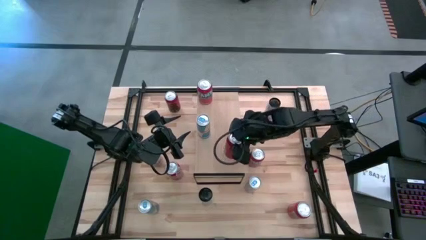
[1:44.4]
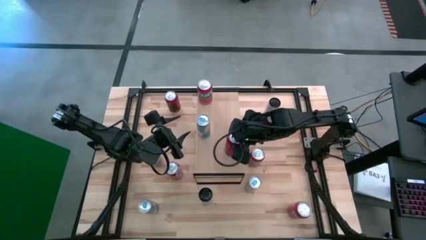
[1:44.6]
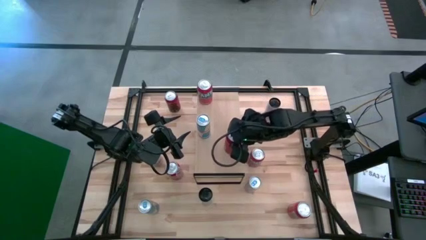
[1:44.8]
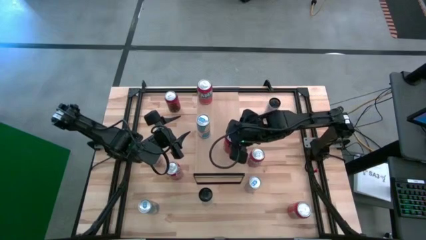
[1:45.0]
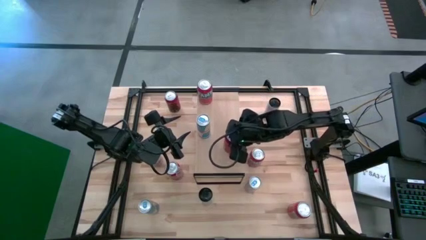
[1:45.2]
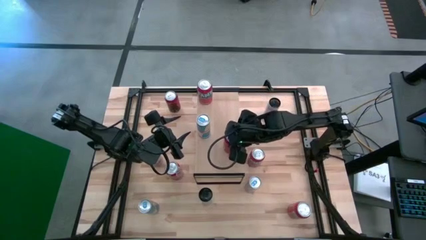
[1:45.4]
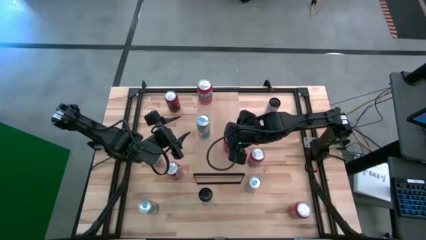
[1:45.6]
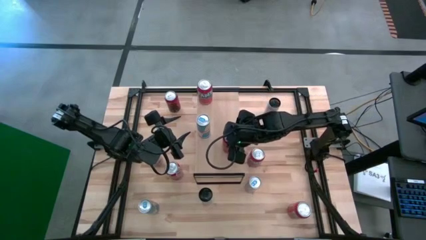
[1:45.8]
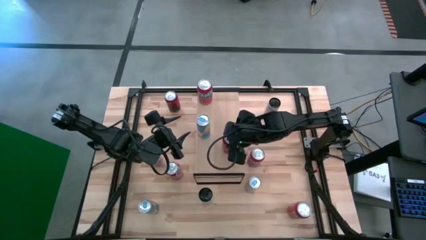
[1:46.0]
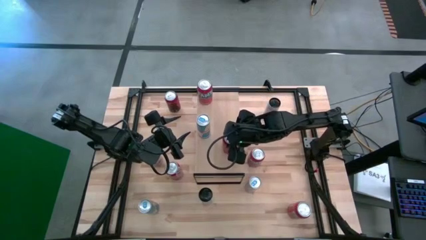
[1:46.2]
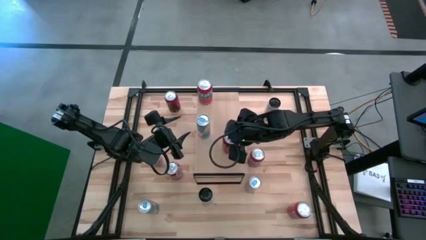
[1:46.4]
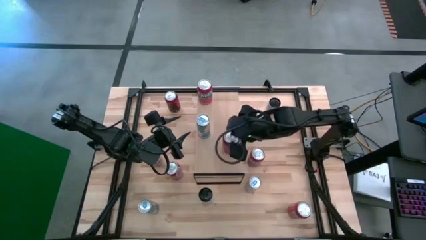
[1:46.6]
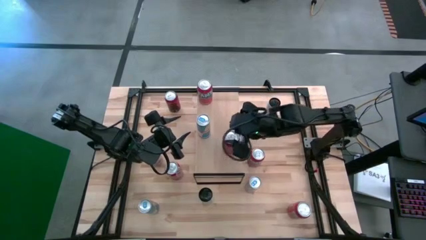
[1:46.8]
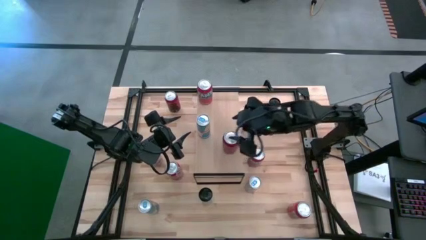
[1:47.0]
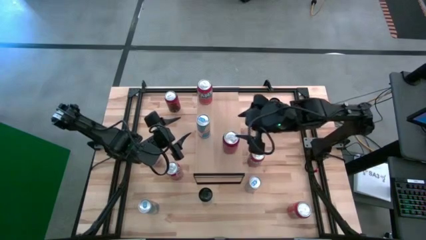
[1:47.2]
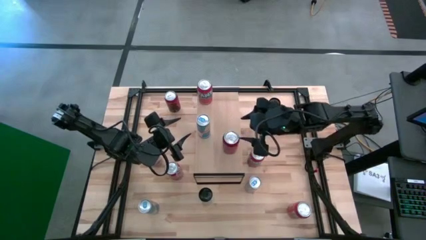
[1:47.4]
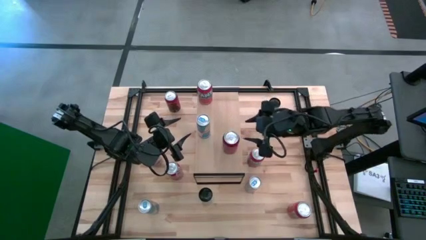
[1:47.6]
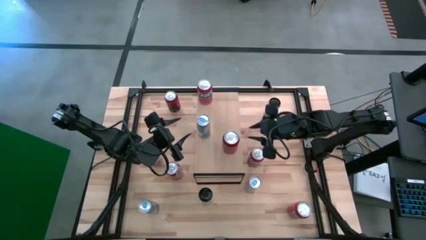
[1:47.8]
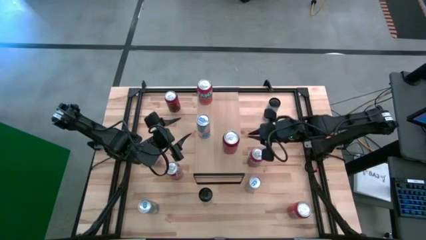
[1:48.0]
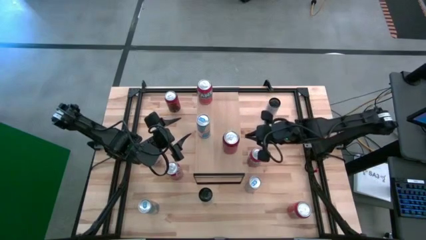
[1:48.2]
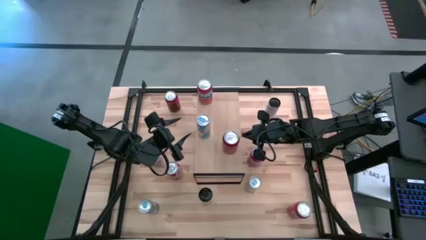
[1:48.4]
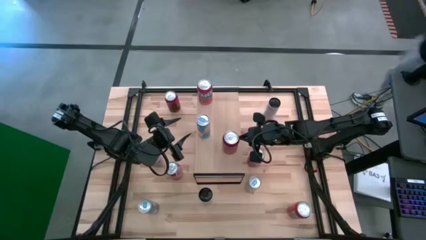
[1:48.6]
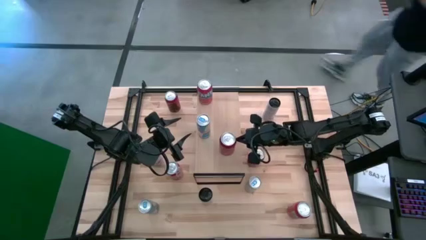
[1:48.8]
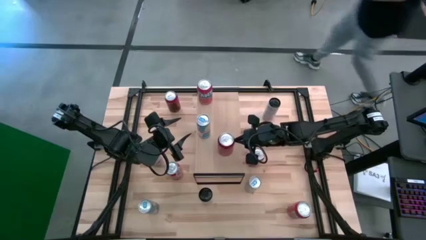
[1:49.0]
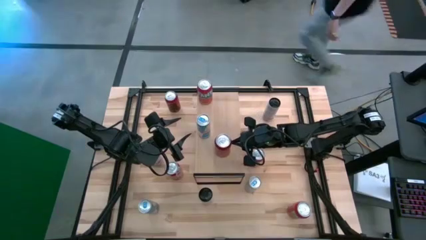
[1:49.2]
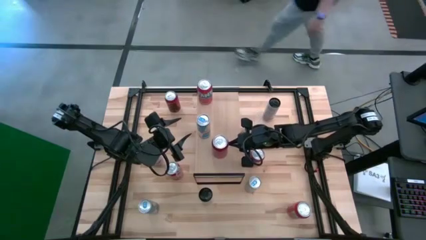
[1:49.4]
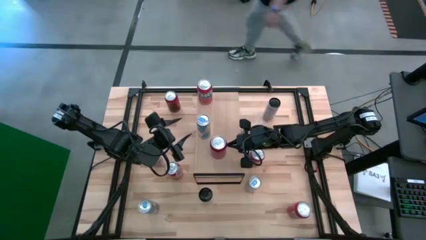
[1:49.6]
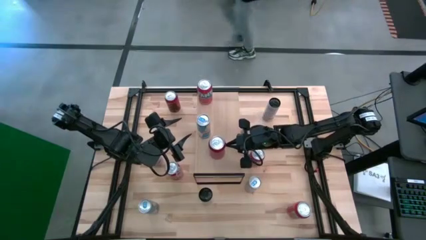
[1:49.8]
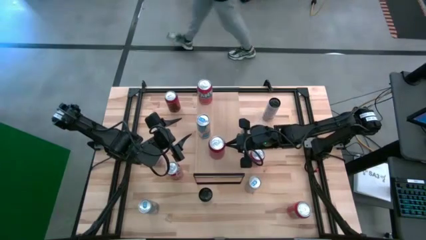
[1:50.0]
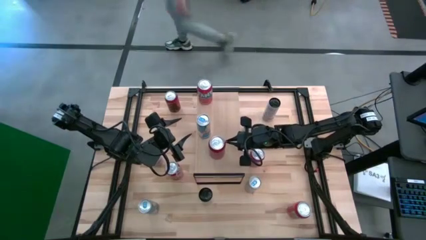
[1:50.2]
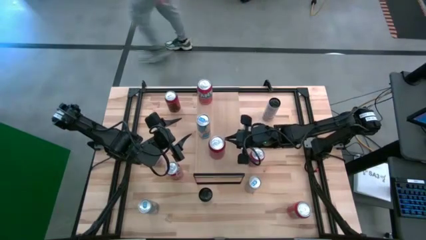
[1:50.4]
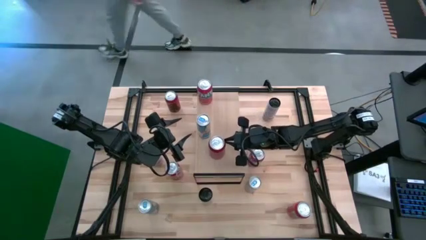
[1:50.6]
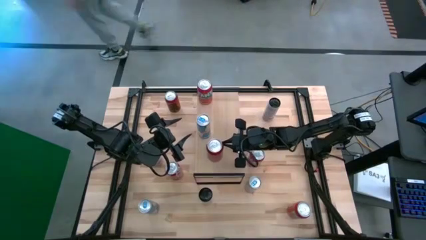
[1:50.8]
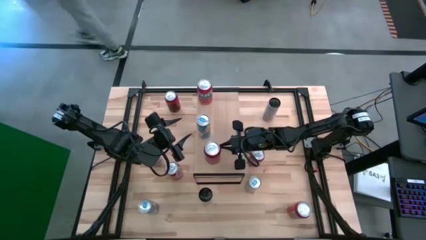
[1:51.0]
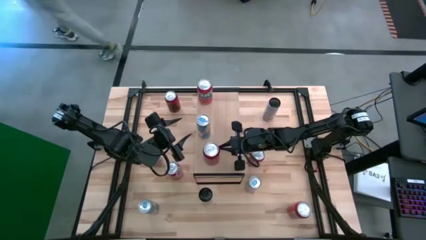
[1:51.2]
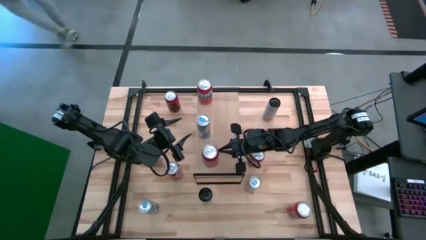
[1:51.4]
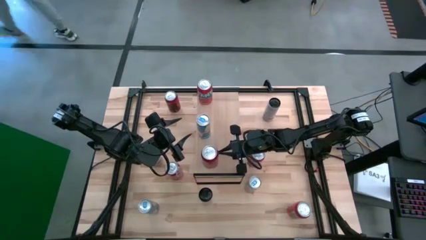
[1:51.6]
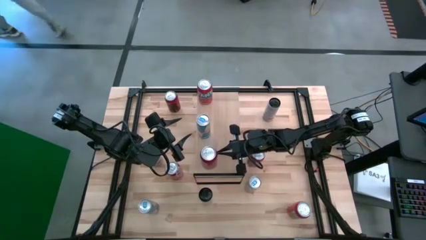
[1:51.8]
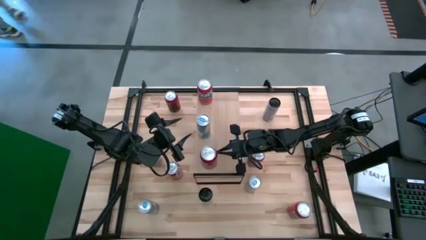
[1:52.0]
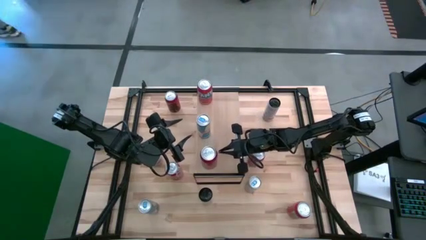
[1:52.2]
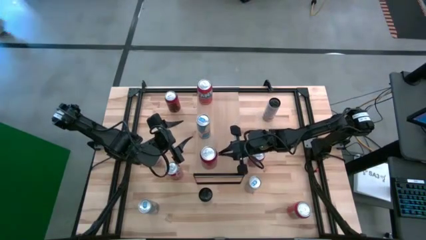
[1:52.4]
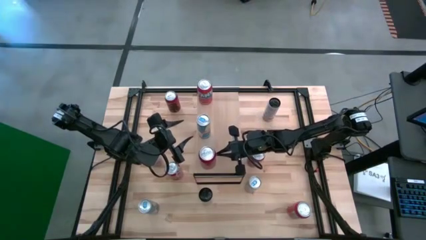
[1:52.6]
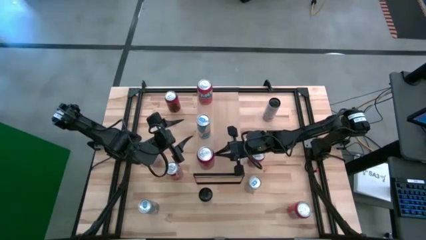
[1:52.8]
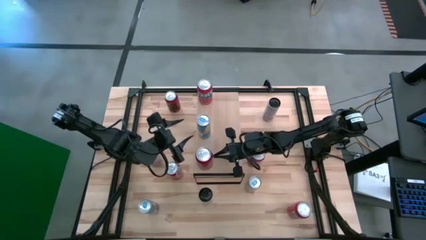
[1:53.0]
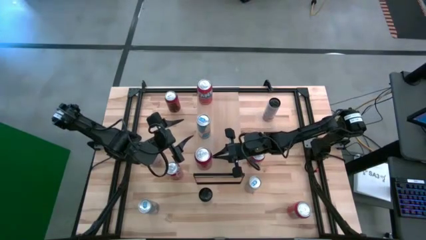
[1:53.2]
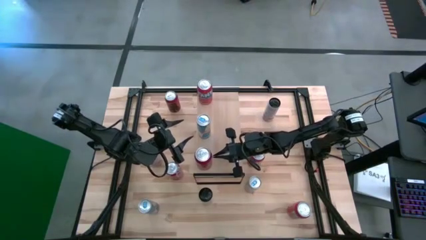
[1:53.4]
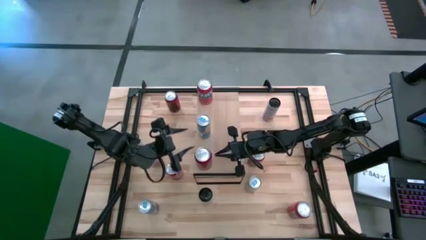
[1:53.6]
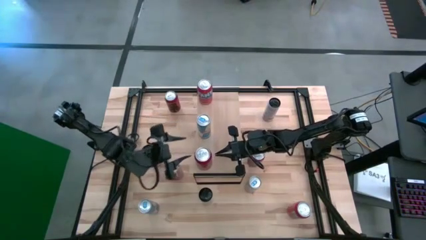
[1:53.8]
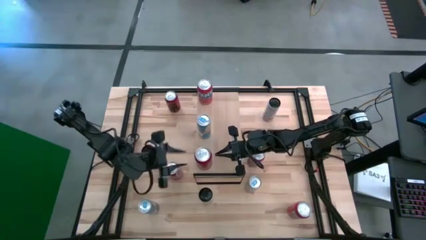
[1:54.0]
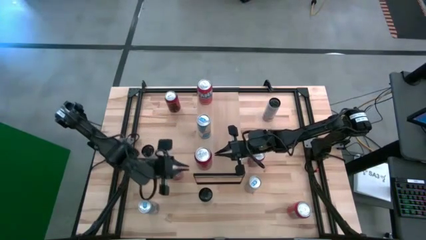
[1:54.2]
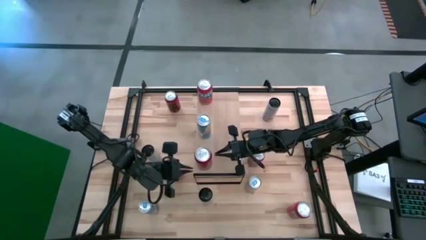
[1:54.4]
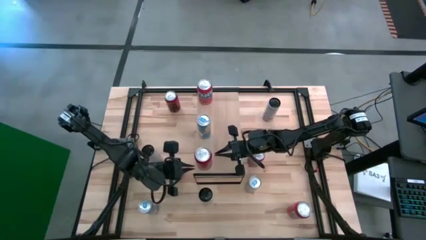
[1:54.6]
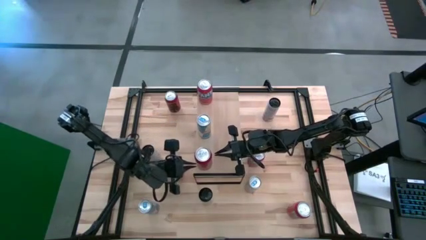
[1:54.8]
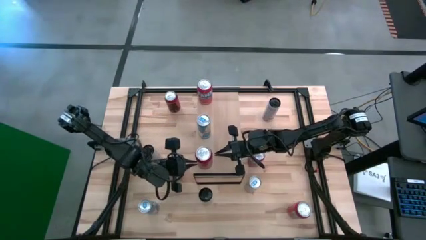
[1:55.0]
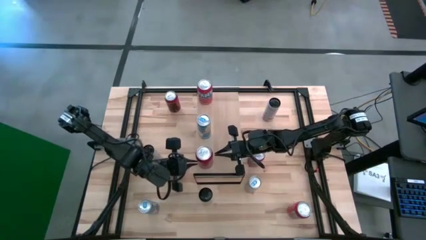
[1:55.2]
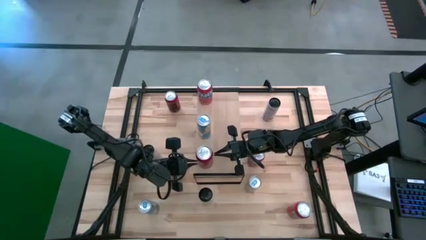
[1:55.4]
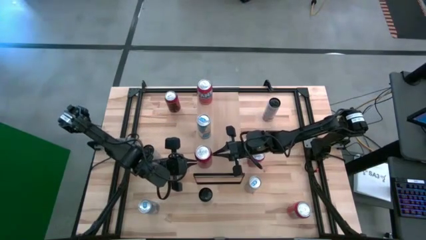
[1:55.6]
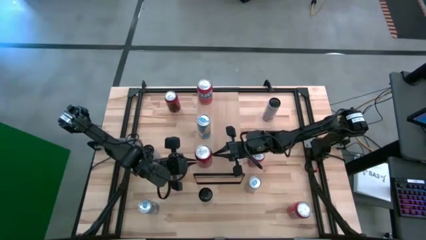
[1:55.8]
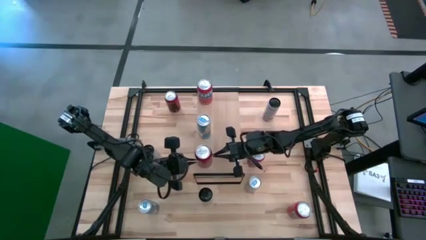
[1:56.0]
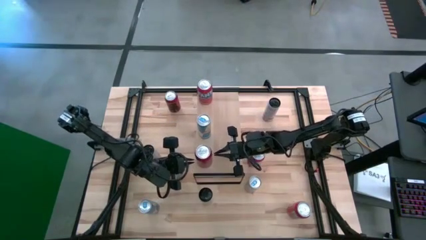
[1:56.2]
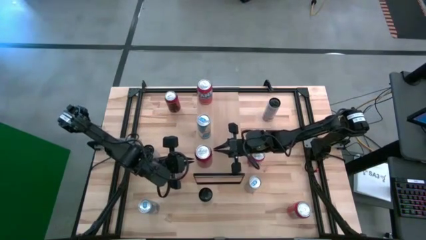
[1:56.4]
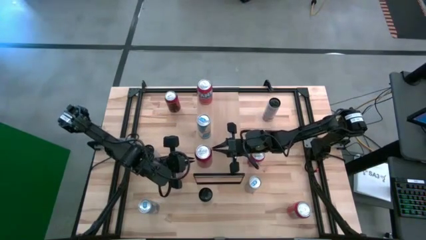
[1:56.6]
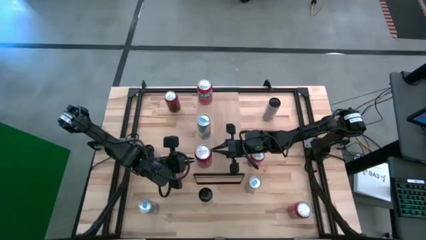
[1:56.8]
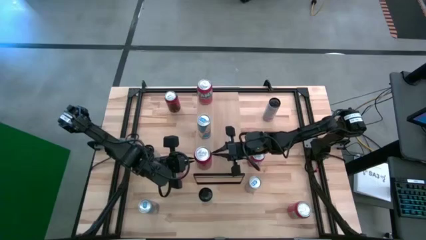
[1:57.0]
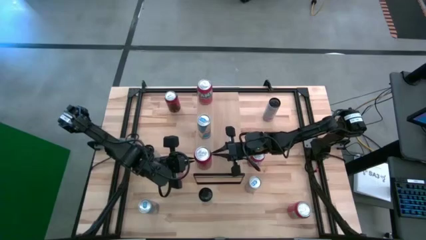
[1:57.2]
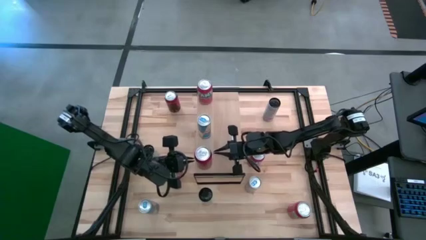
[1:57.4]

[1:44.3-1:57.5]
Task: Place canned beverage on shelf
Put the red and black soda can on the right shelf
